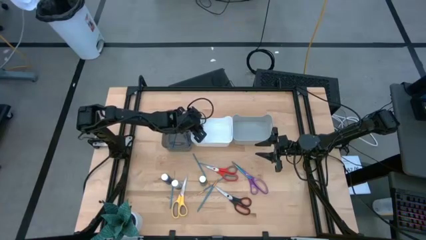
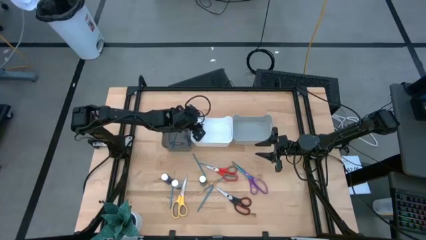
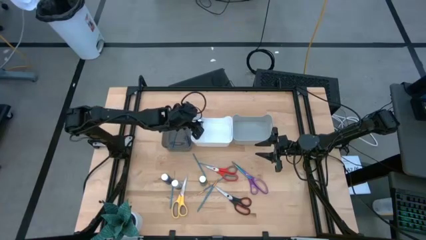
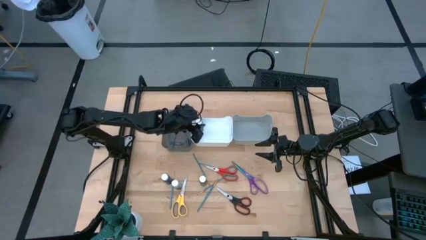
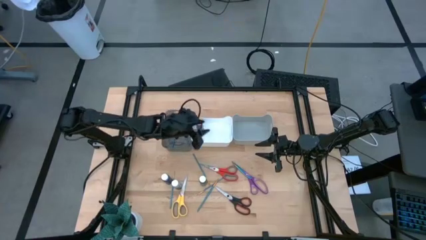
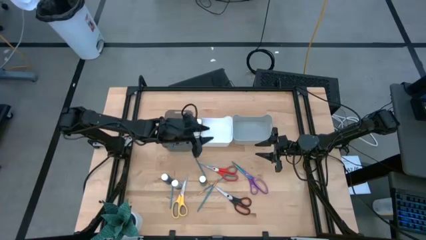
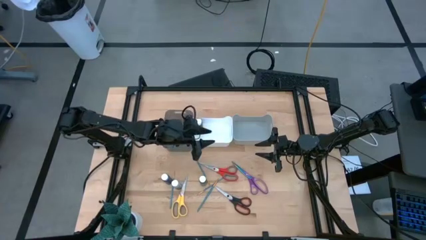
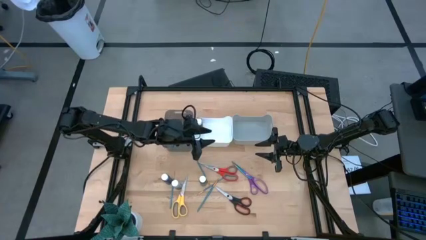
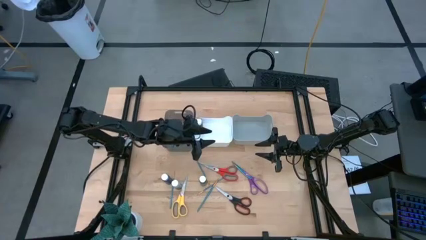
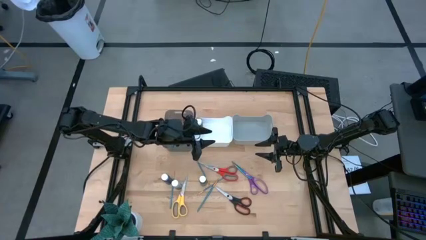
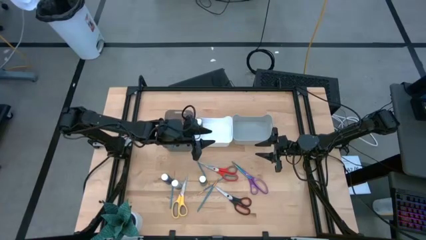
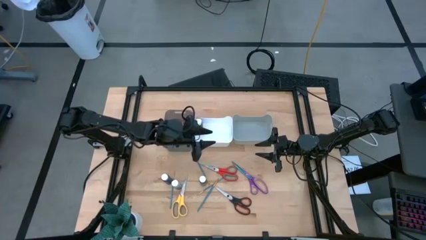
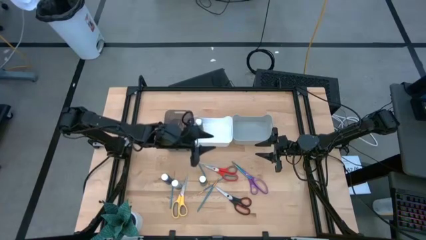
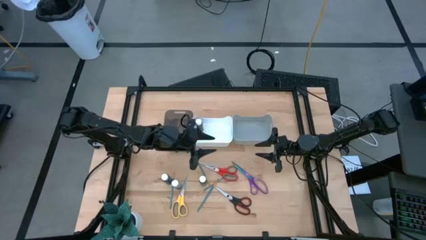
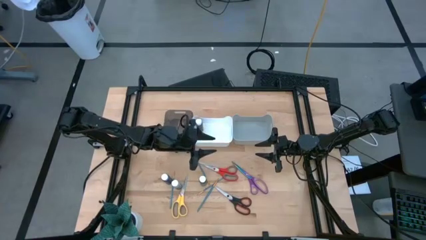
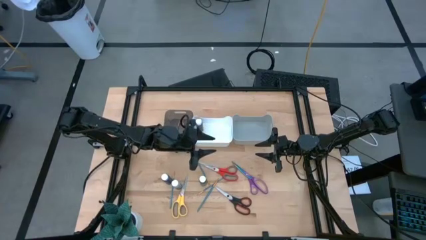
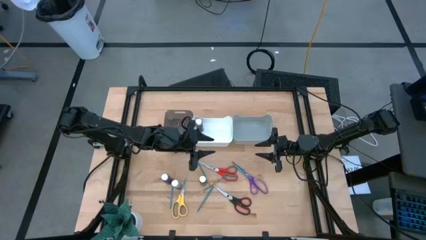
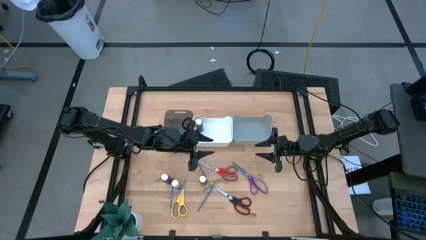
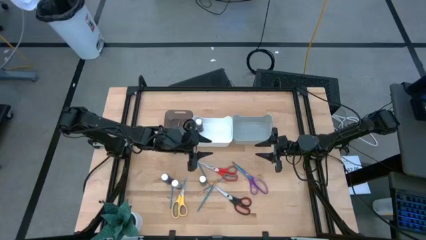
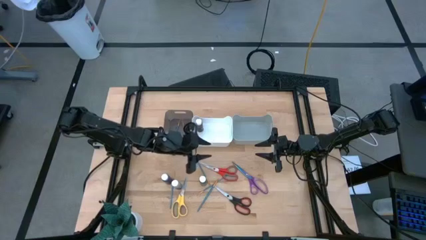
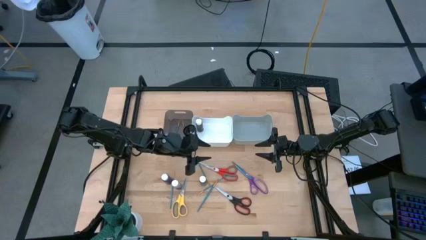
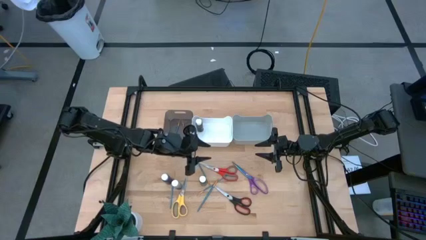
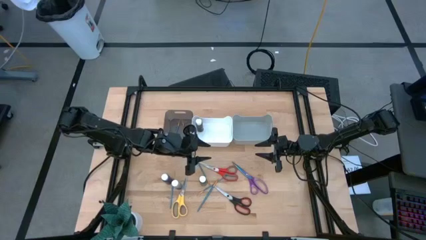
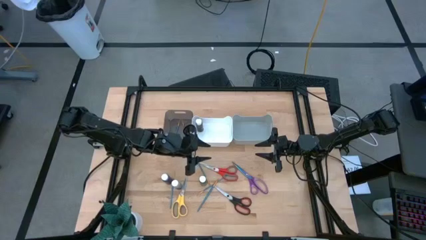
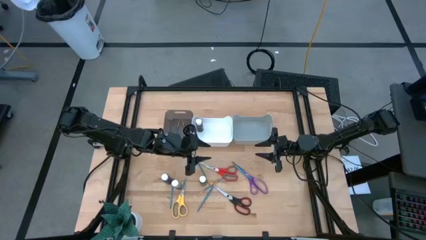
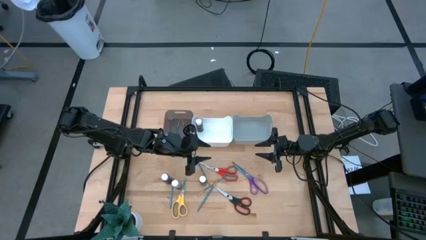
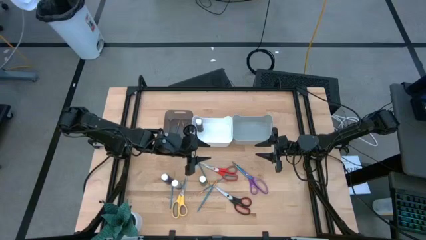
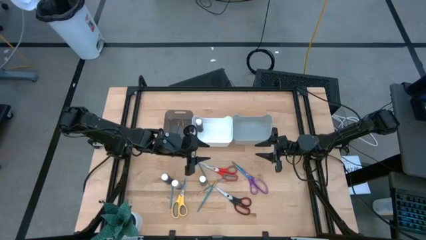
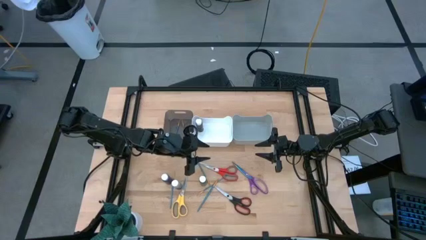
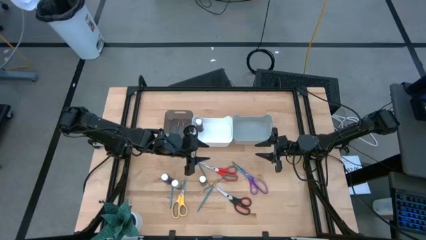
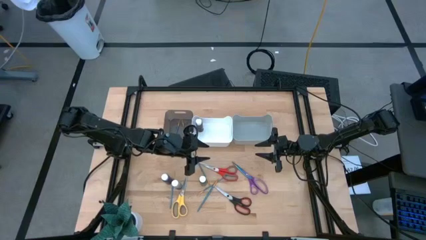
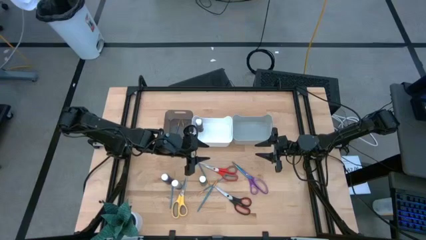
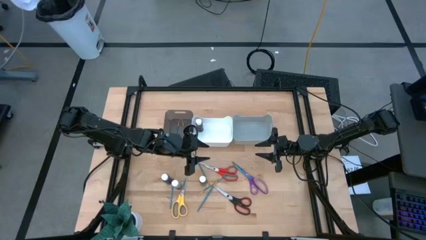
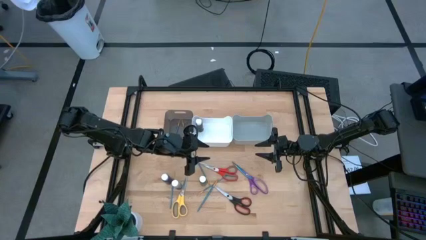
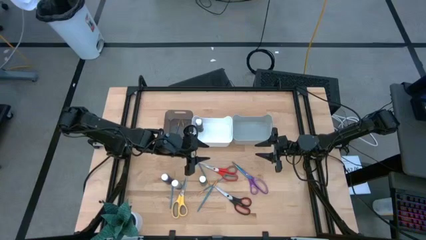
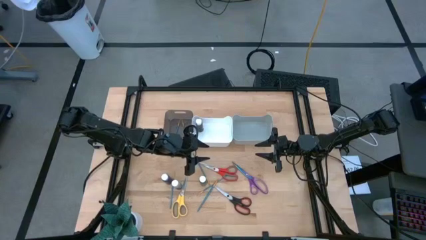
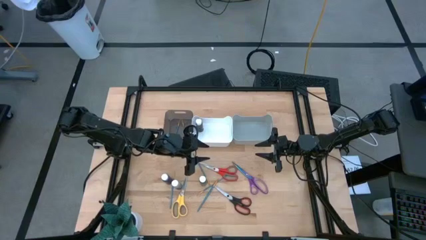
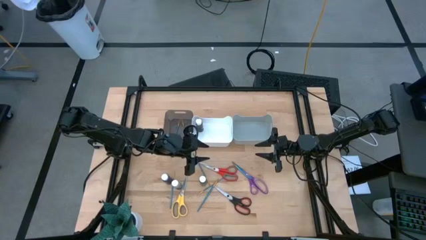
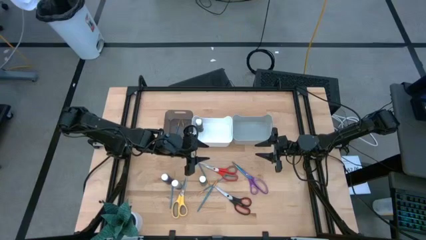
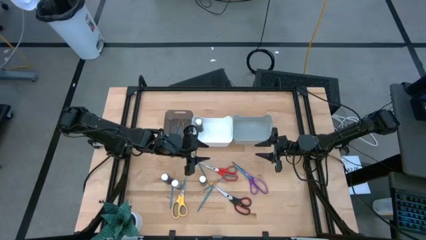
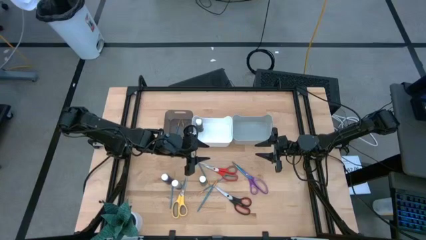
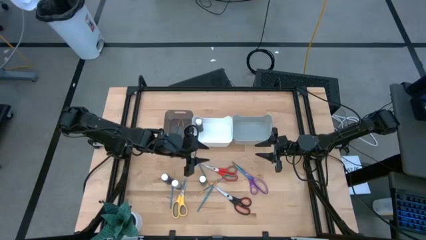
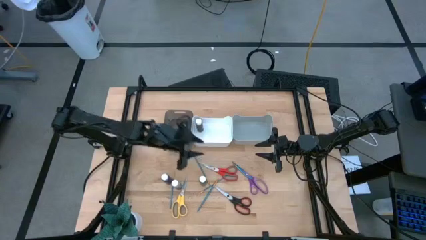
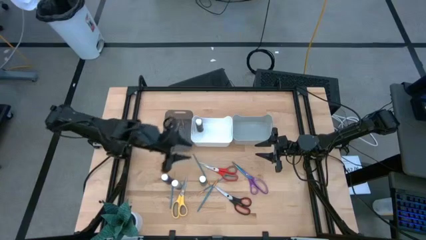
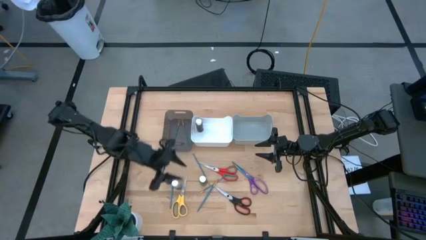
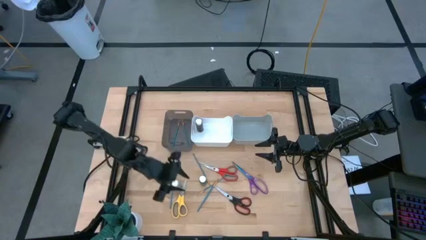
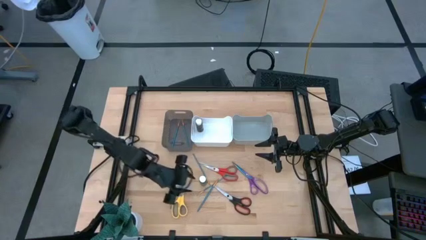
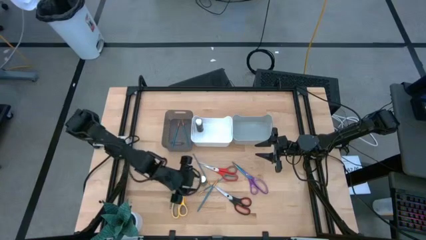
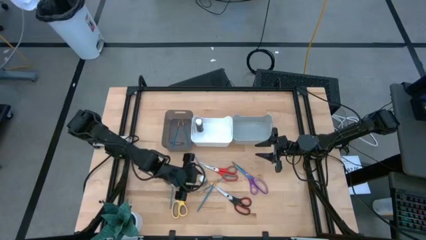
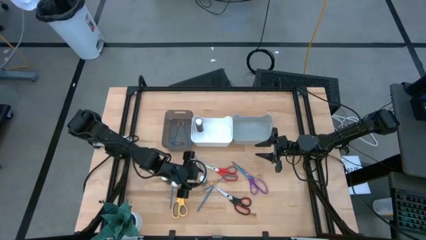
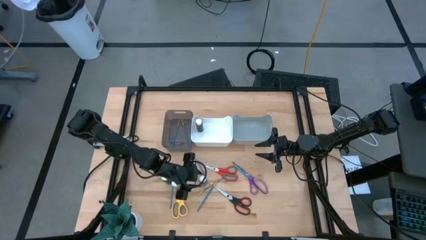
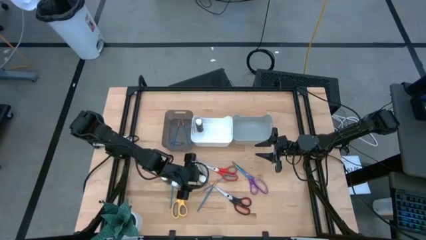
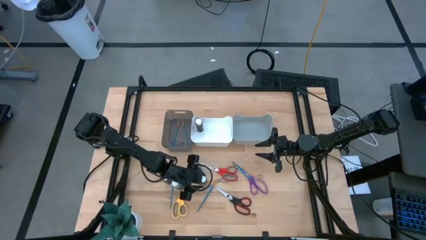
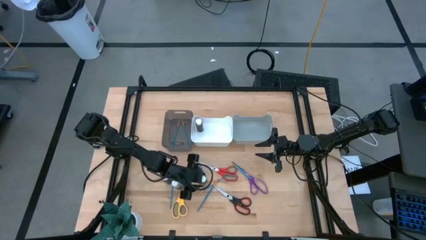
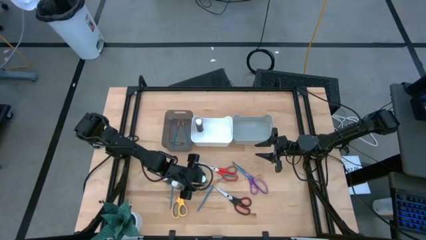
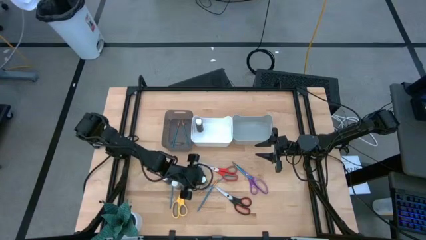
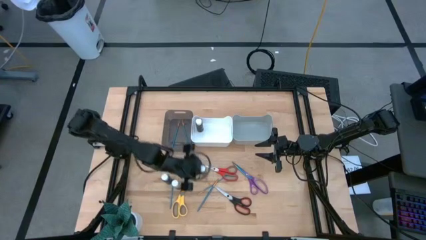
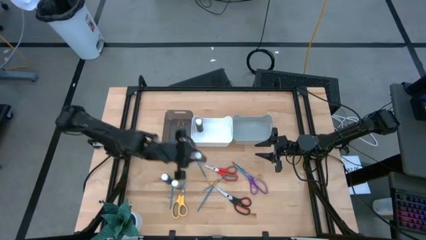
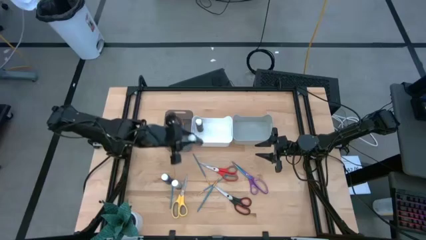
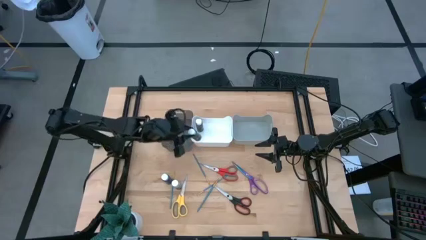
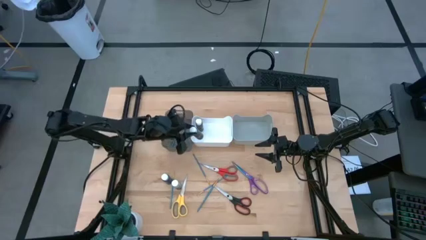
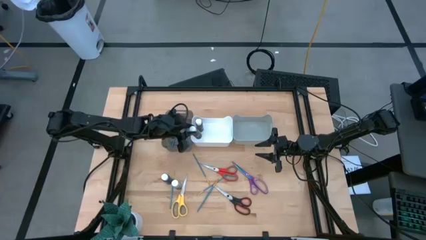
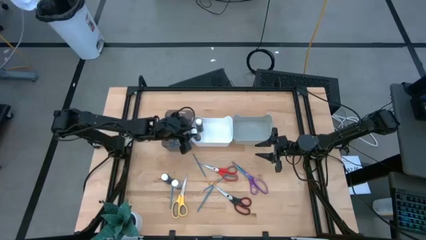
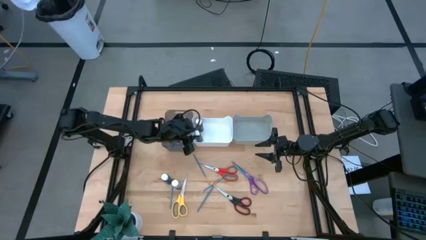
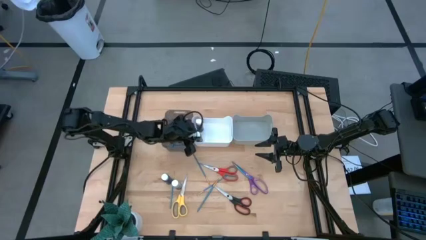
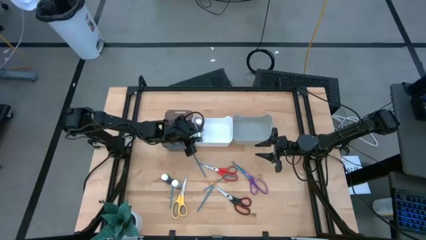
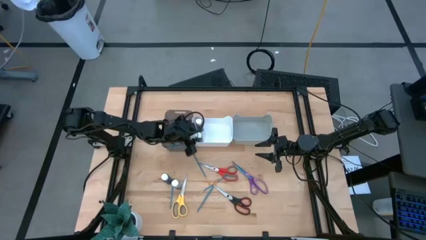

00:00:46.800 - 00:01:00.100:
Task: Pick & Place Paint Supplies
Put the green paint bottle into the white bin
